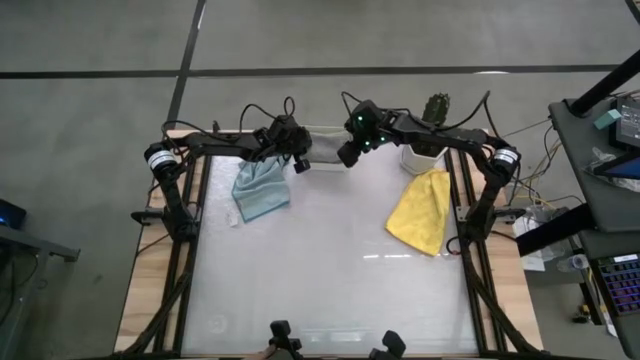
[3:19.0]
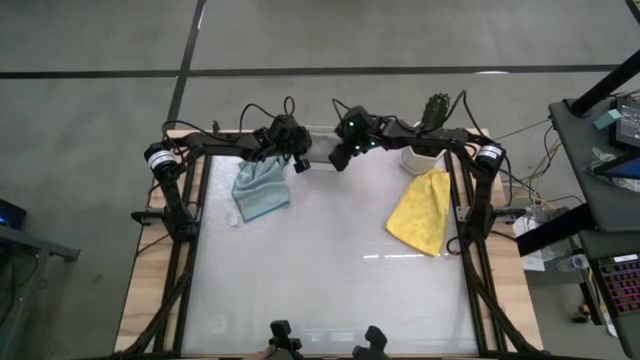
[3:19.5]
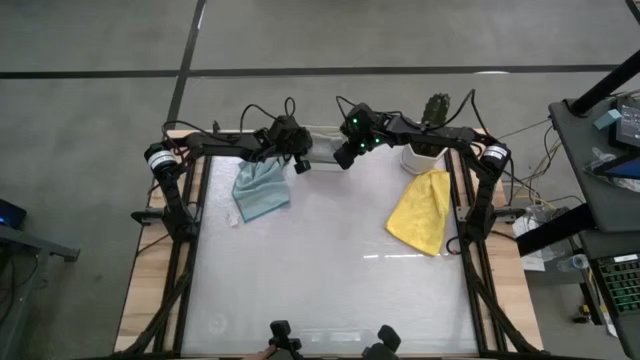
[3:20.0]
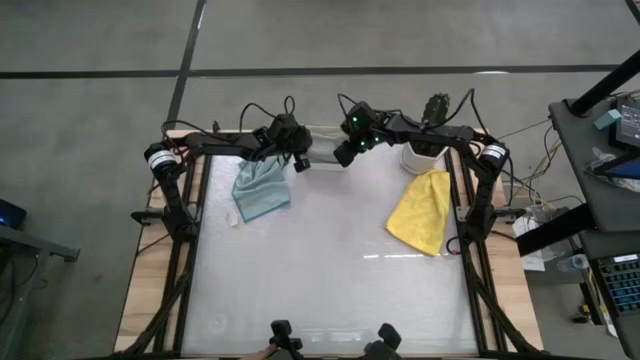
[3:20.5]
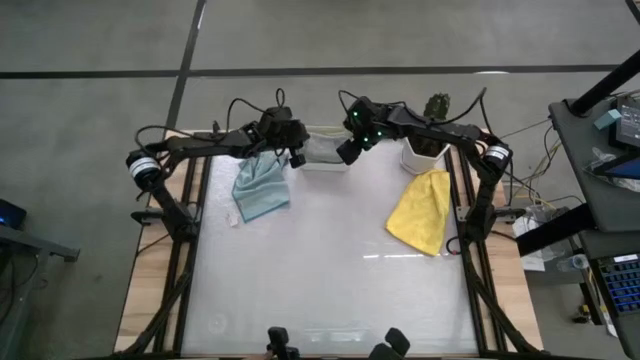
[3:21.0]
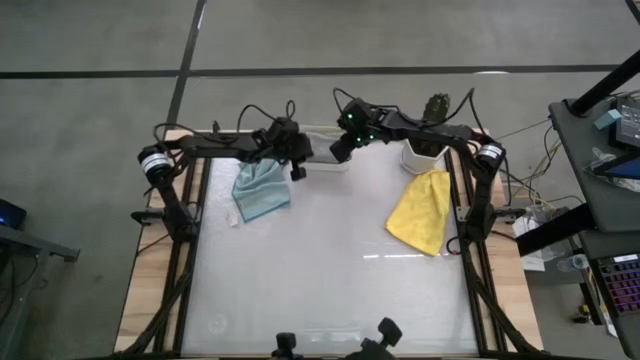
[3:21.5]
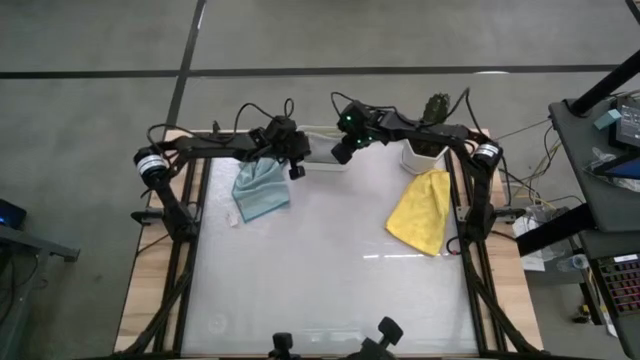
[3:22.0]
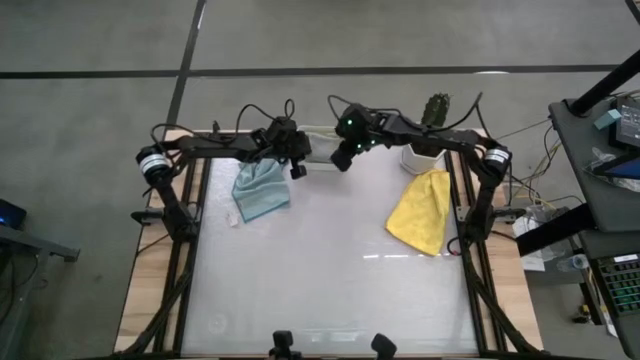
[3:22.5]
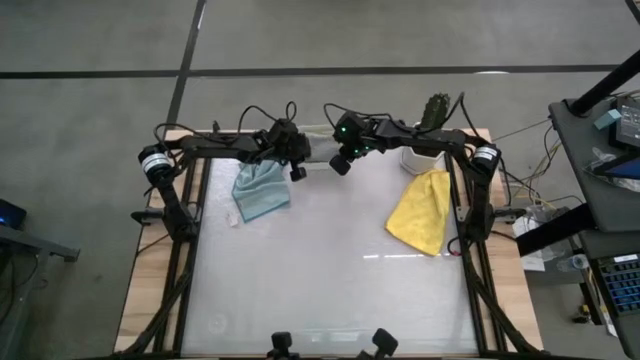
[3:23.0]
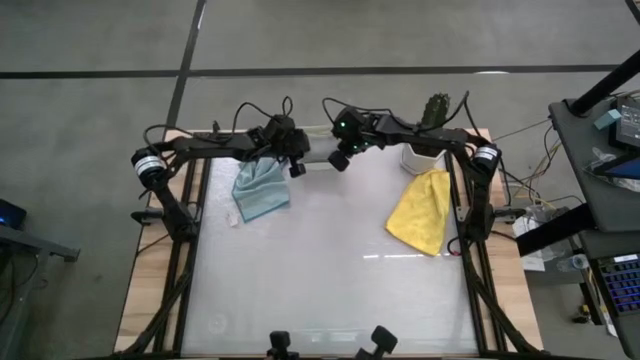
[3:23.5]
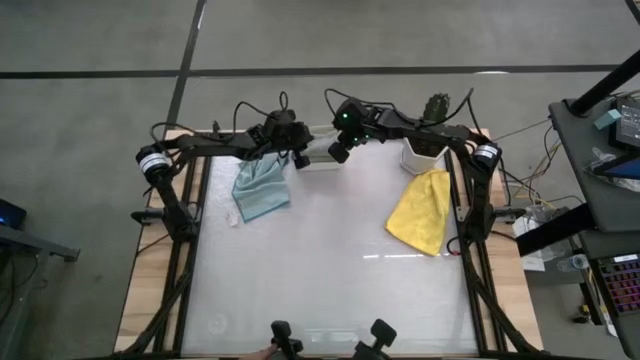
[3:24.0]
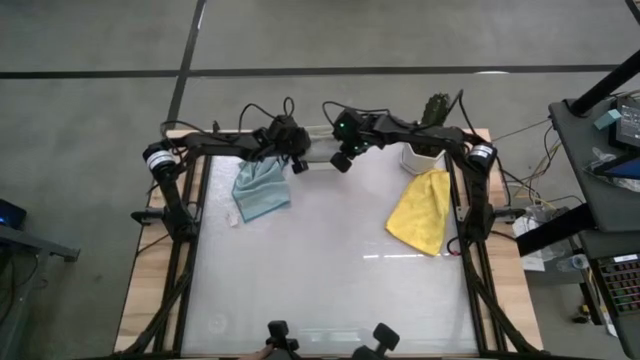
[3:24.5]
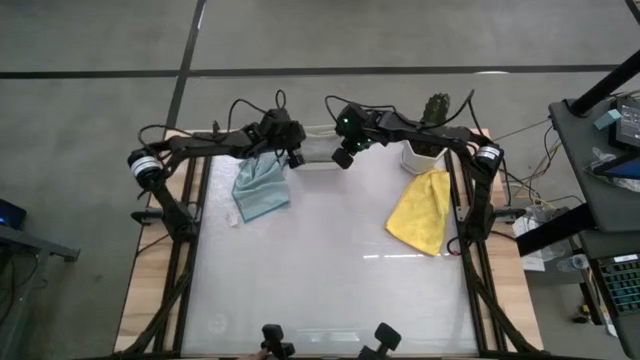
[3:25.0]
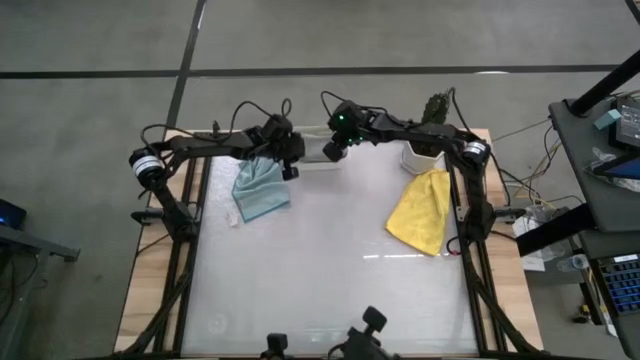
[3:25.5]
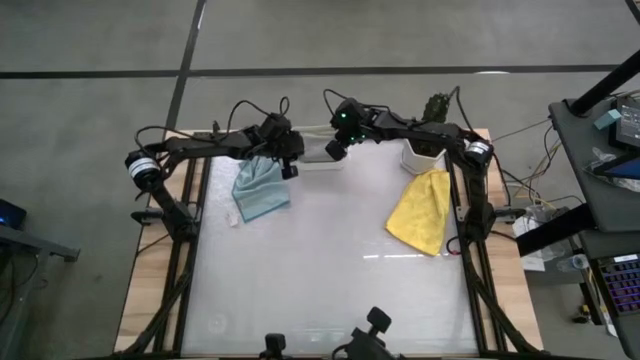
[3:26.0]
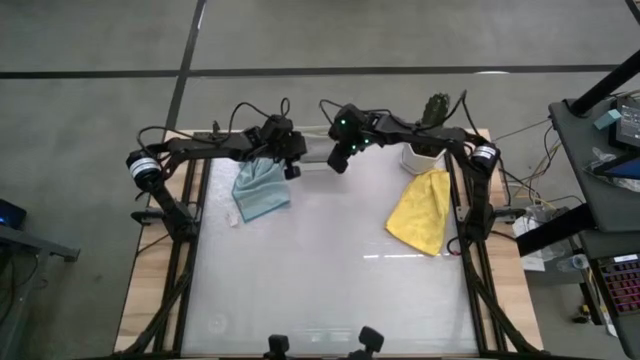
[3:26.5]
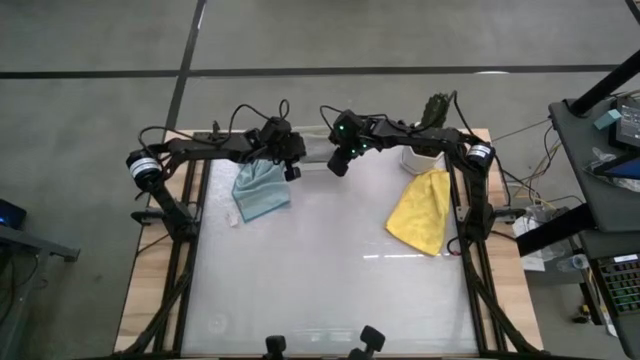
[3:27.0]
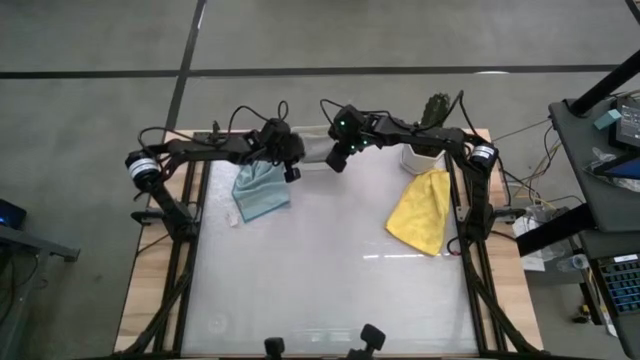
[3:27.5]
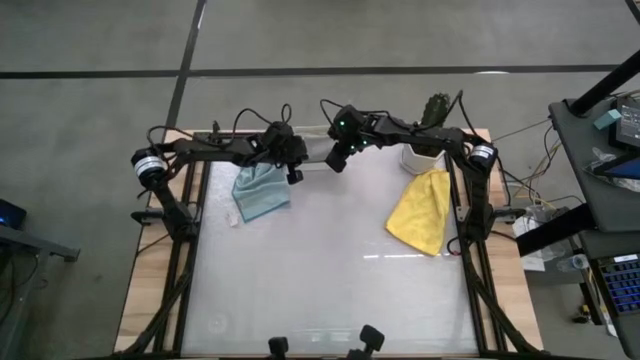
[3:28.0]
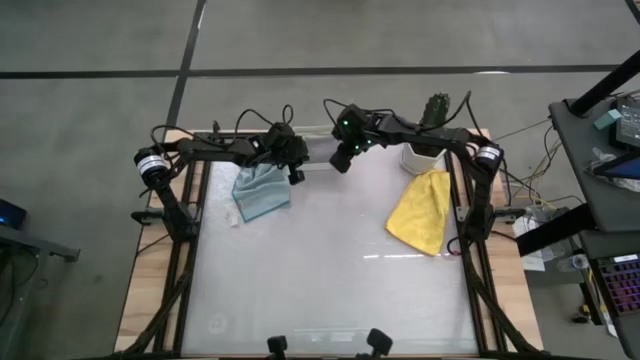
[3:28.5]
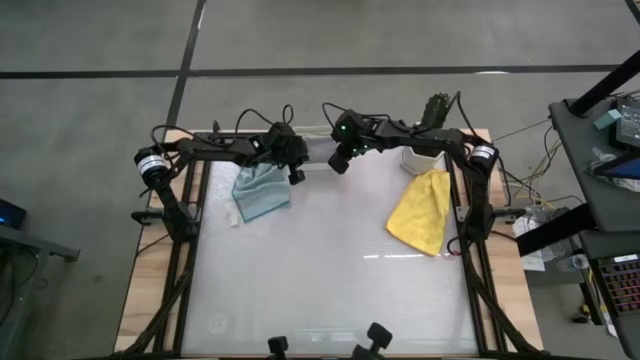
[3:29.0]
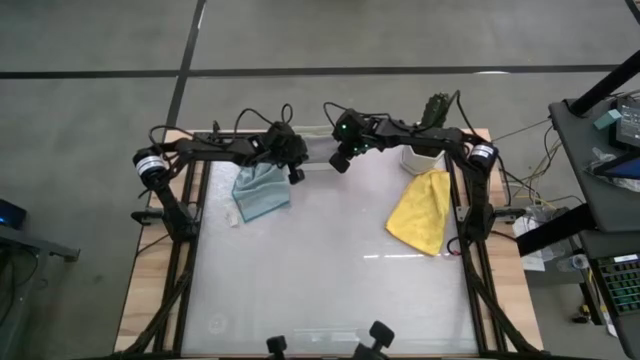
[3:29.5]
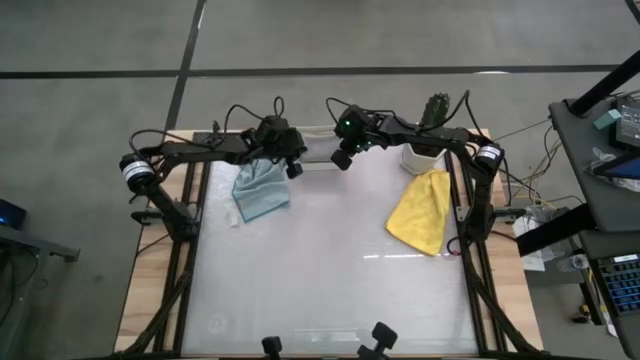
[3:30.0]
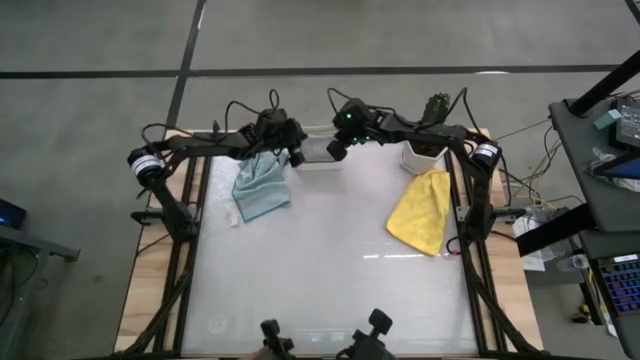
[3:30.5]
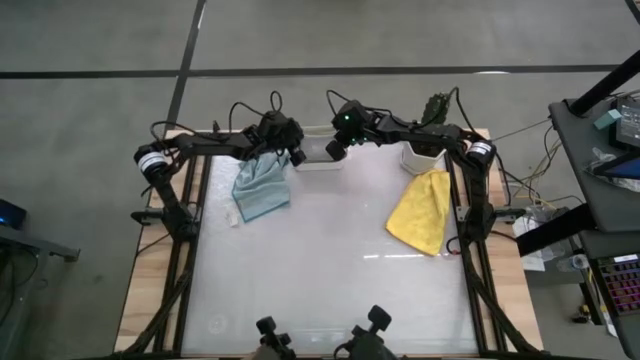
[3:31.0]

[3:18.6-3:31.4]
Task: Fold microfiber towels
Put the gray cloth into the bin
